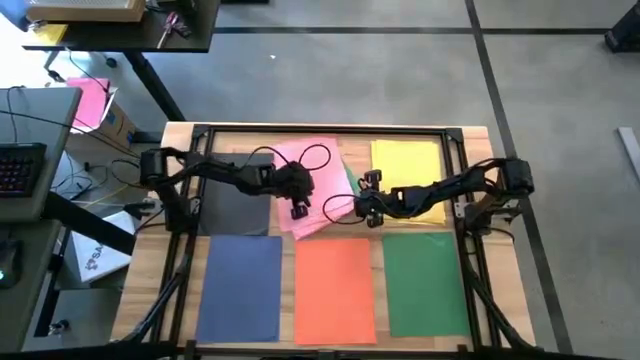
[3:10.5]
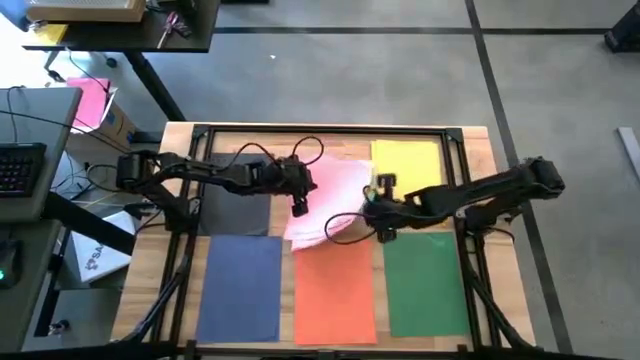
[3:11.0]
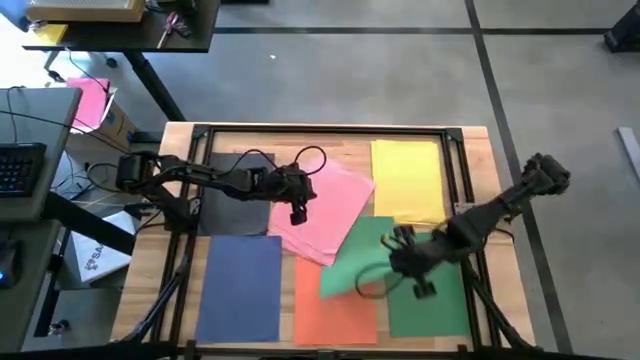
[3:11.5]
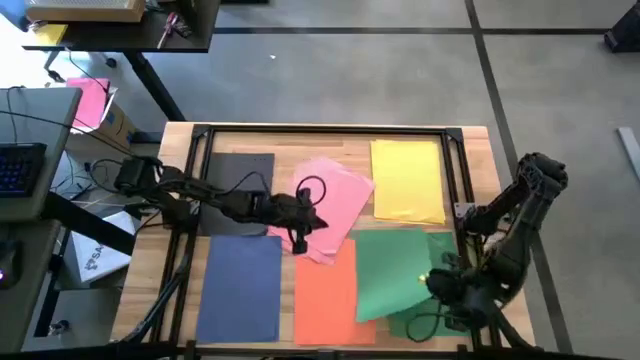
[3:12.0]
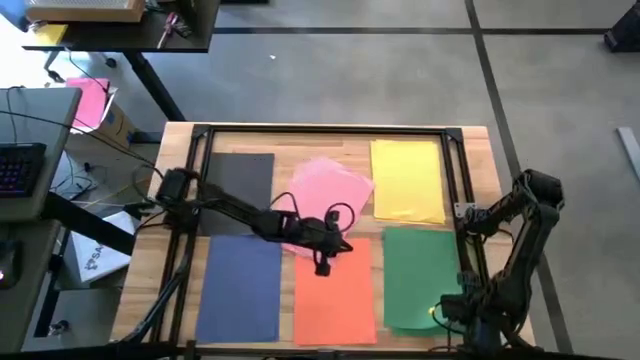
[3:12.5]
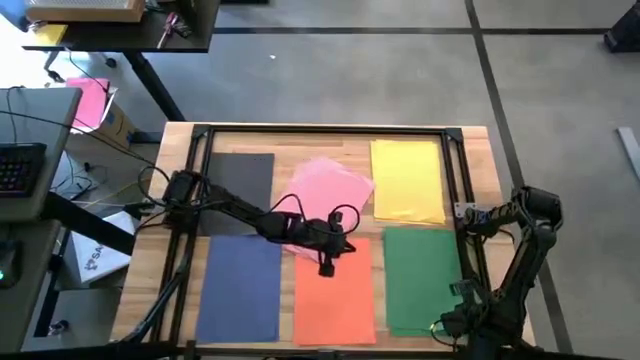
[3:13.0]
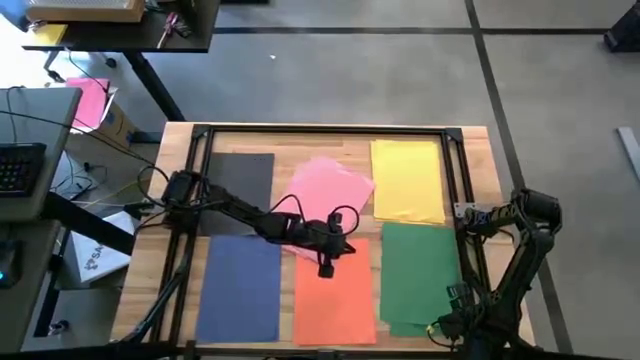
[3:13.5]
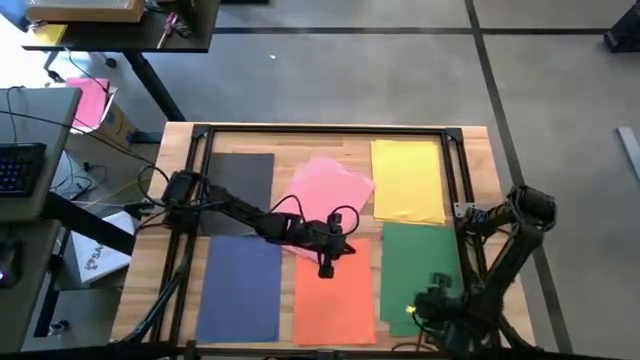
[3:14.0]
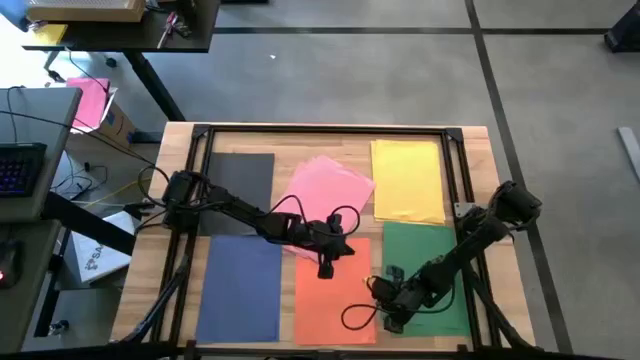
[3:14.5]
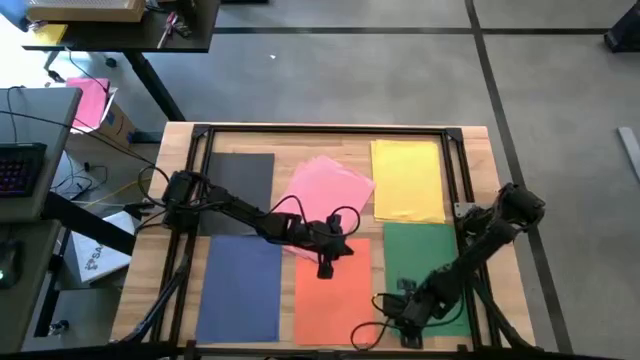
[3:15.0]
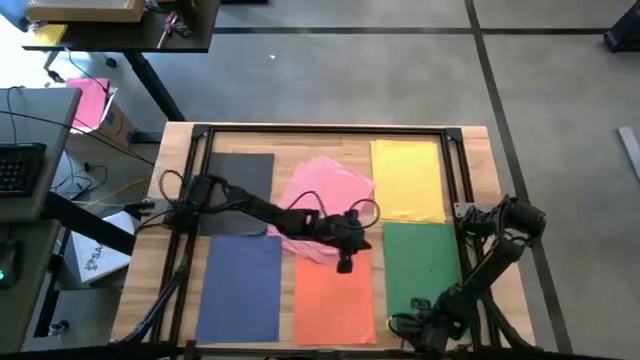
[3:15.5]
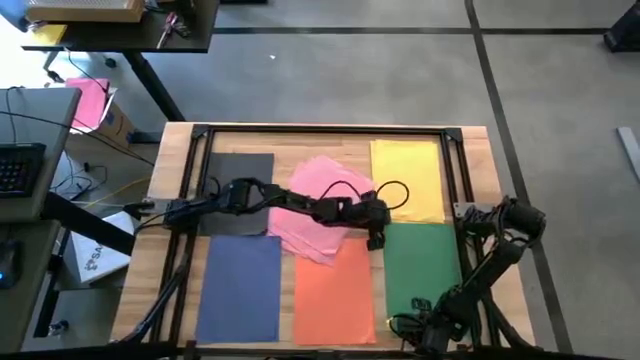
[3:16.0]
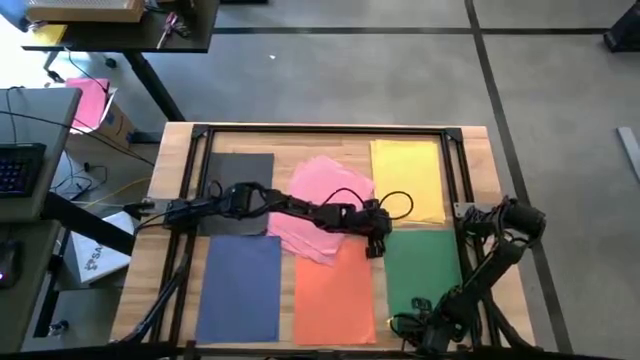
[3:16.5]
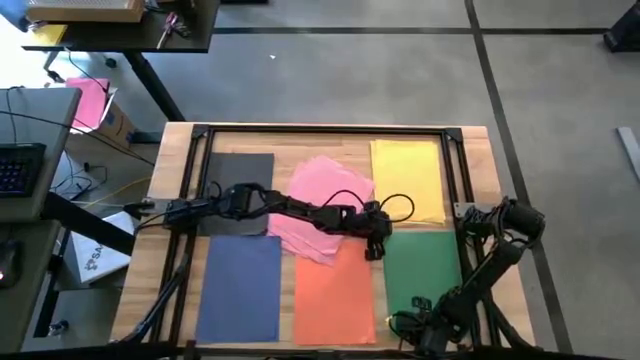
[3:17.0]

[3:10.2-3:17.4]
Task: Organize paper
Stack the green paper on top of the green paper

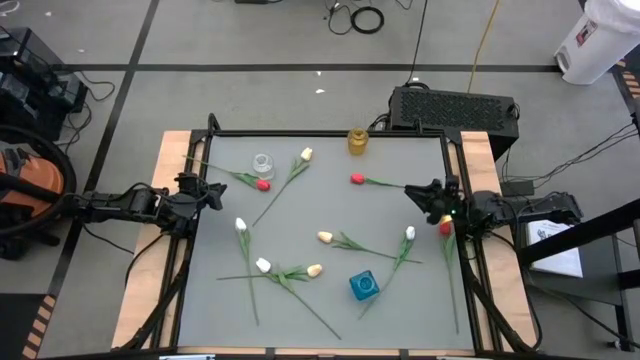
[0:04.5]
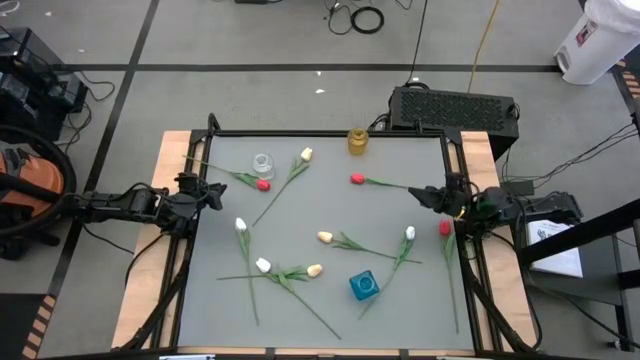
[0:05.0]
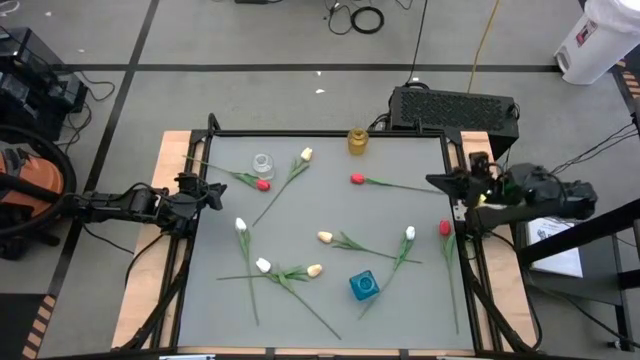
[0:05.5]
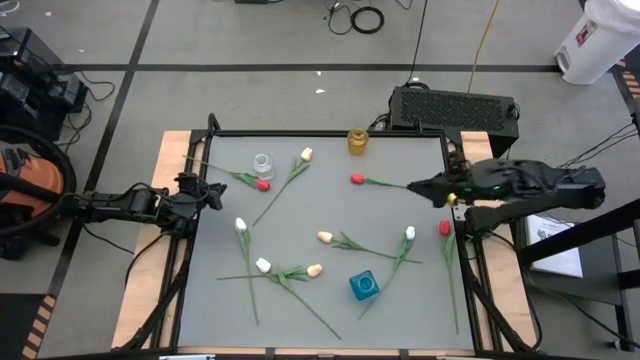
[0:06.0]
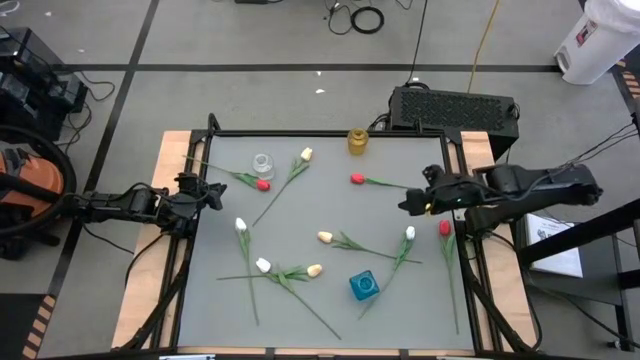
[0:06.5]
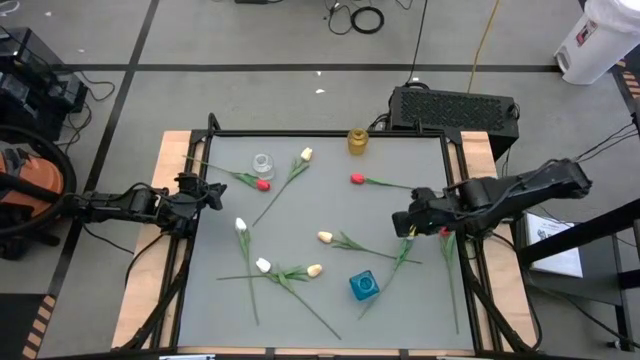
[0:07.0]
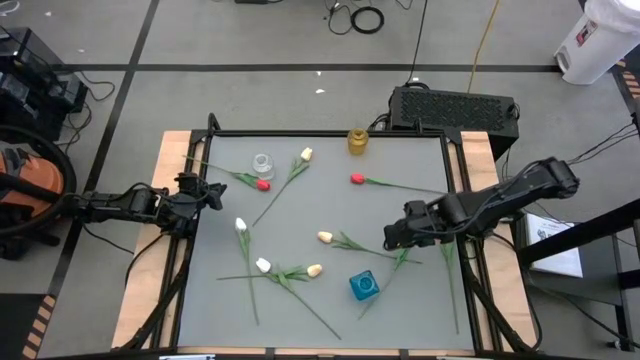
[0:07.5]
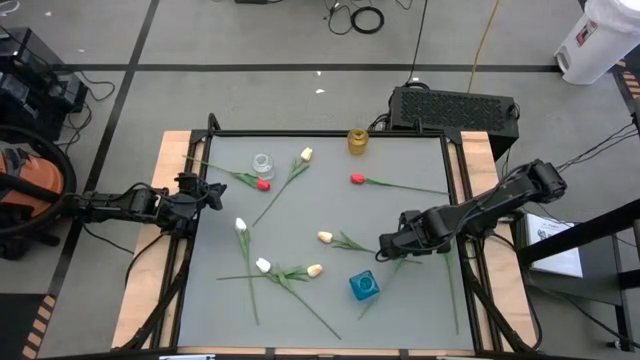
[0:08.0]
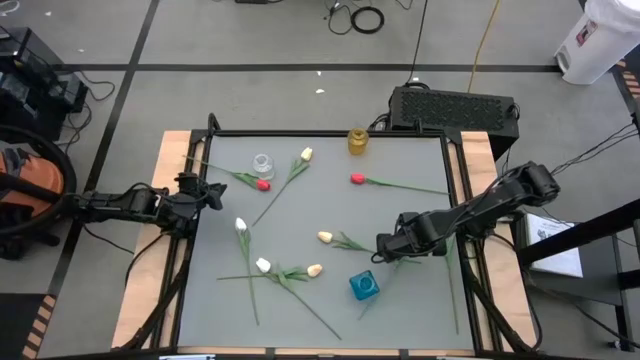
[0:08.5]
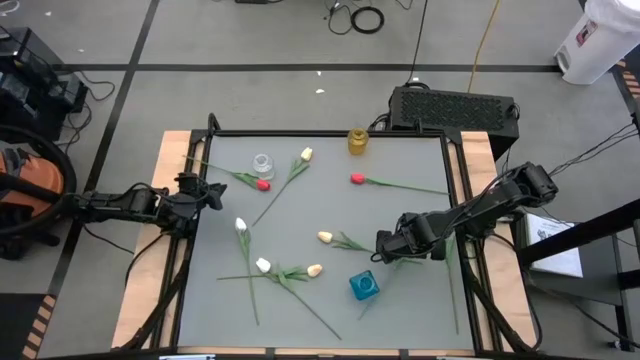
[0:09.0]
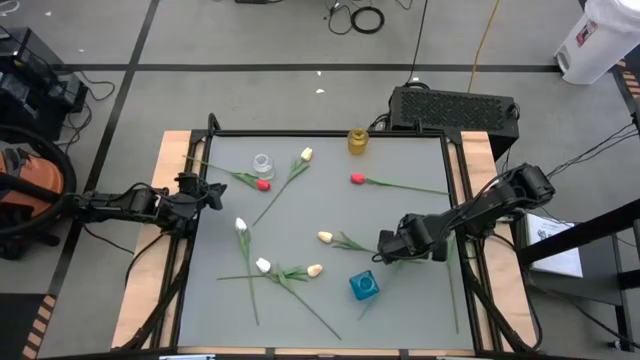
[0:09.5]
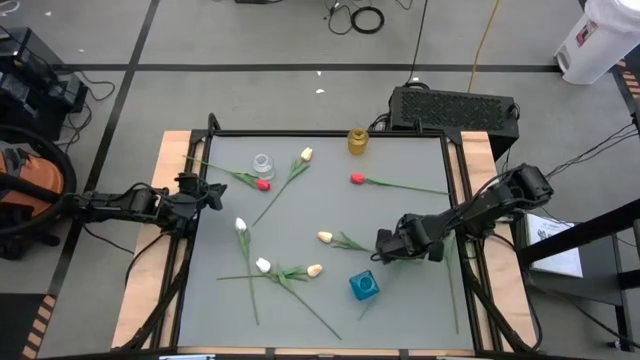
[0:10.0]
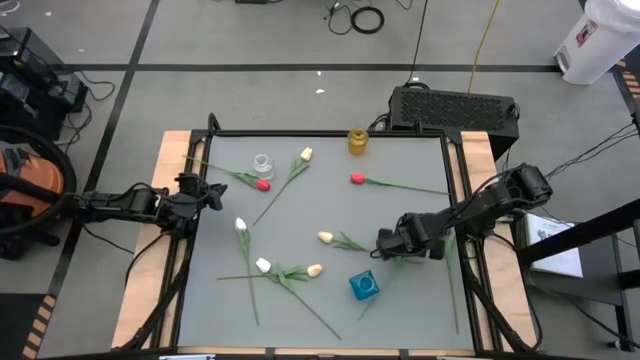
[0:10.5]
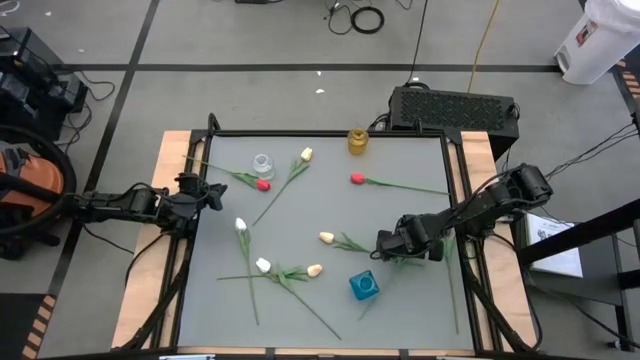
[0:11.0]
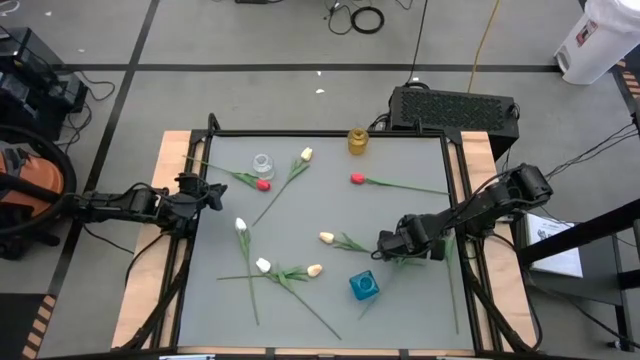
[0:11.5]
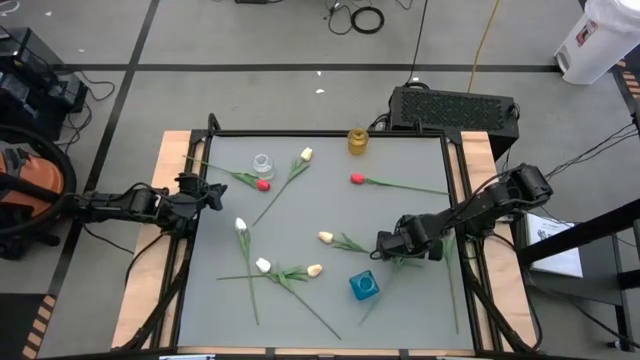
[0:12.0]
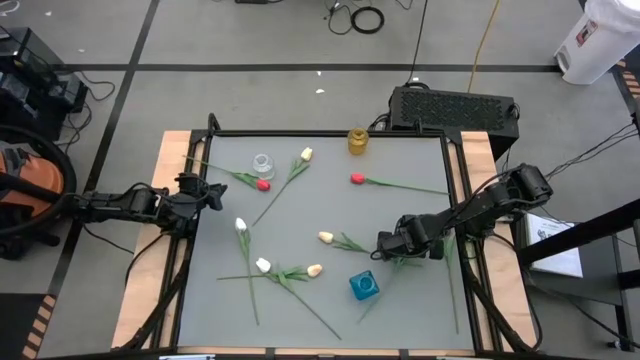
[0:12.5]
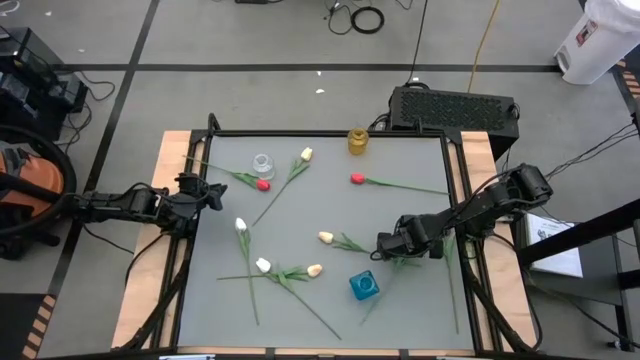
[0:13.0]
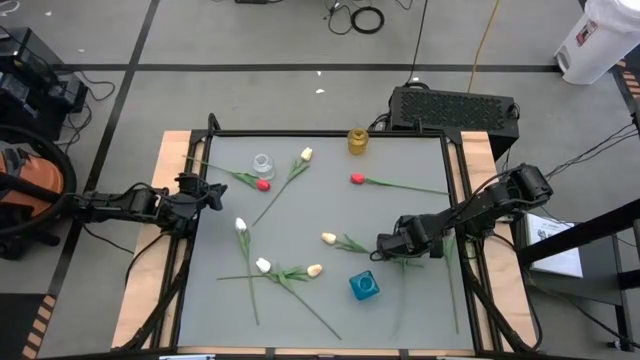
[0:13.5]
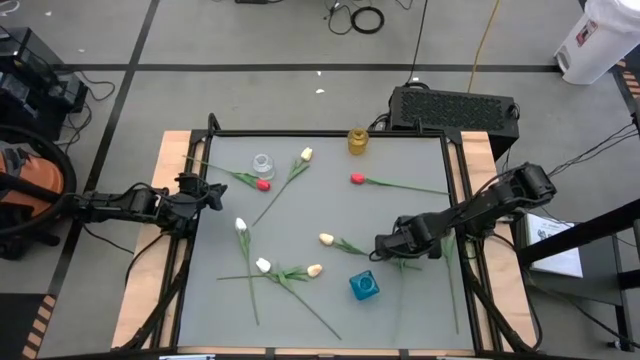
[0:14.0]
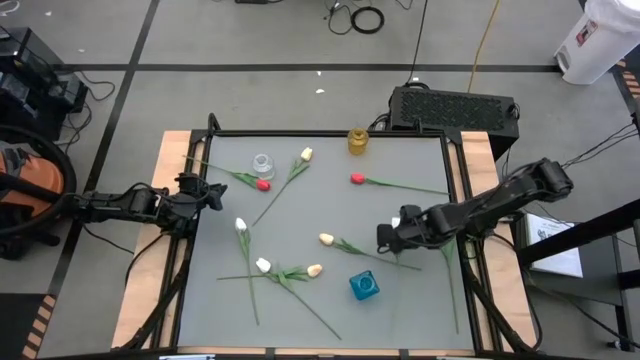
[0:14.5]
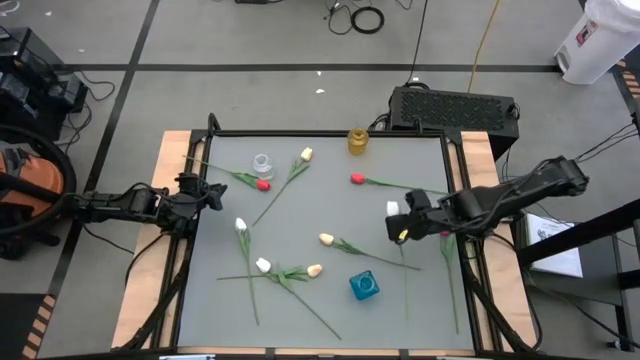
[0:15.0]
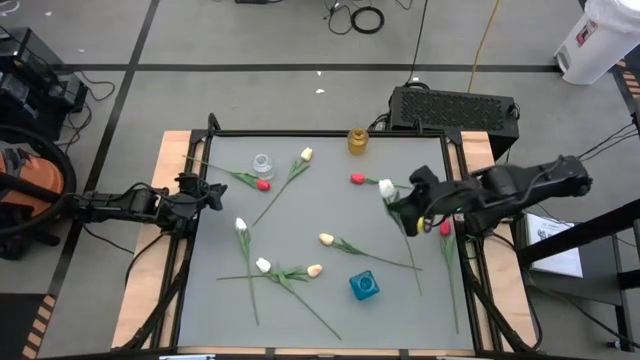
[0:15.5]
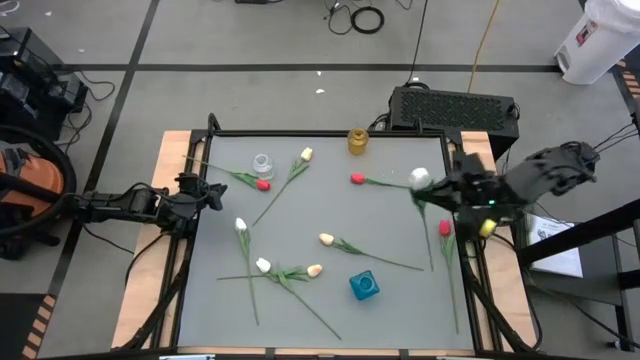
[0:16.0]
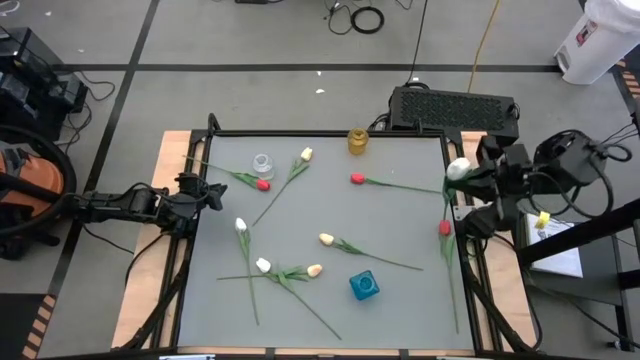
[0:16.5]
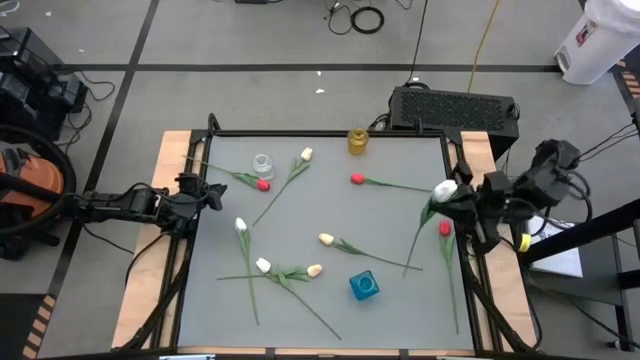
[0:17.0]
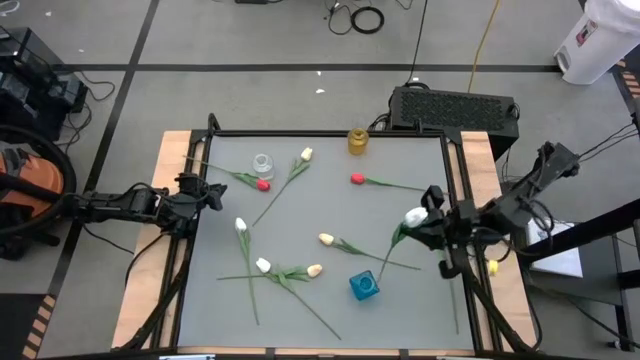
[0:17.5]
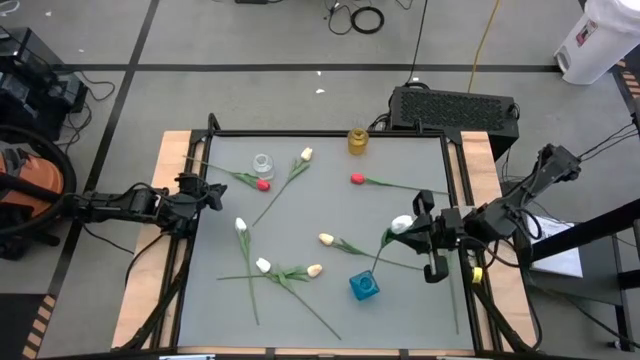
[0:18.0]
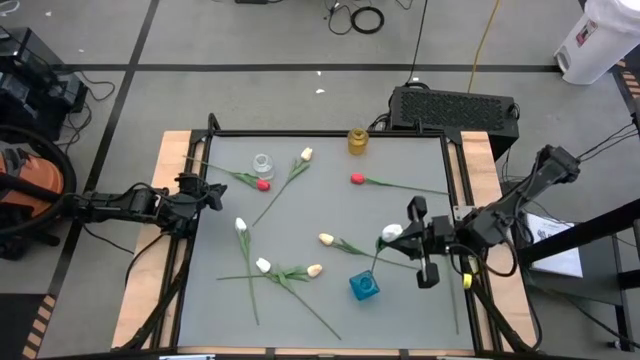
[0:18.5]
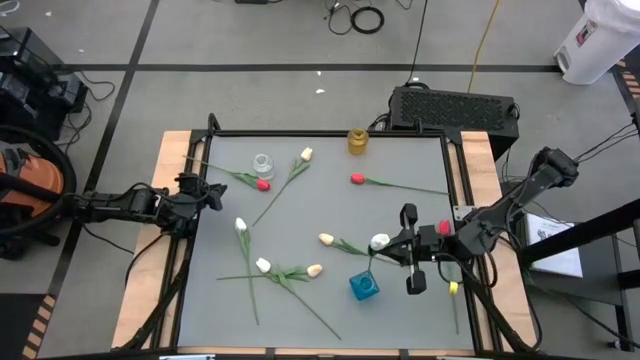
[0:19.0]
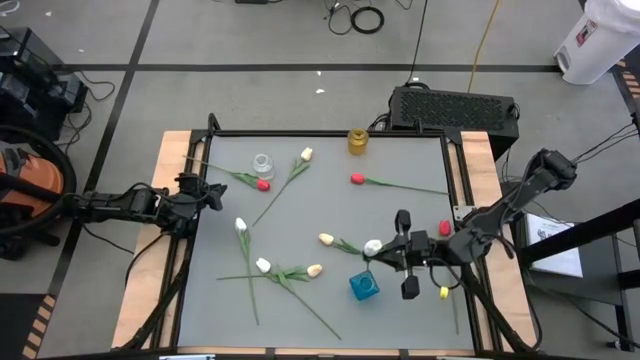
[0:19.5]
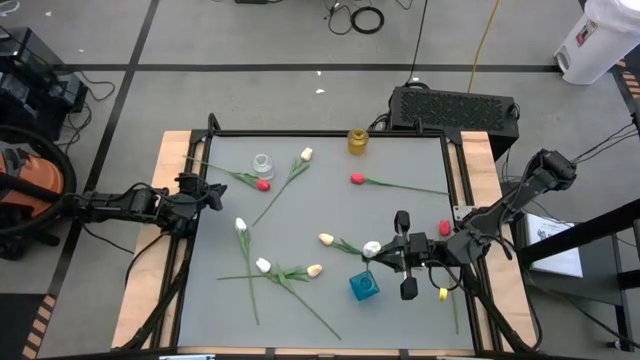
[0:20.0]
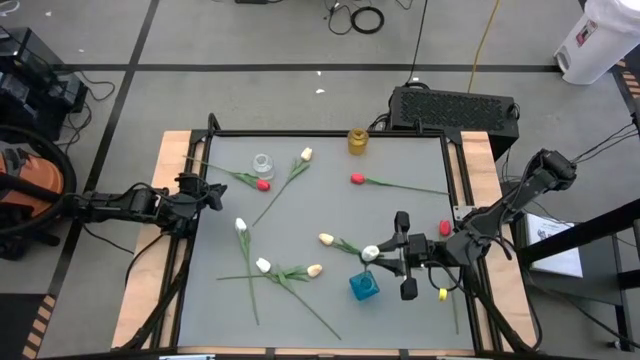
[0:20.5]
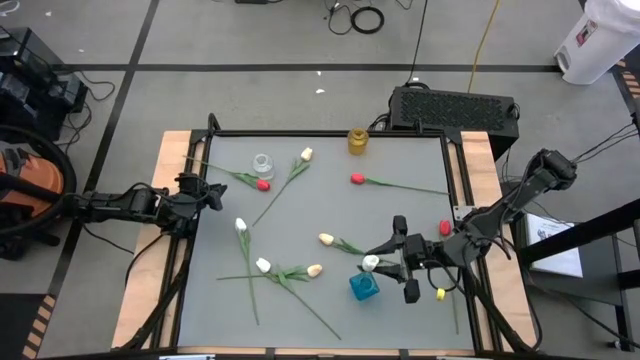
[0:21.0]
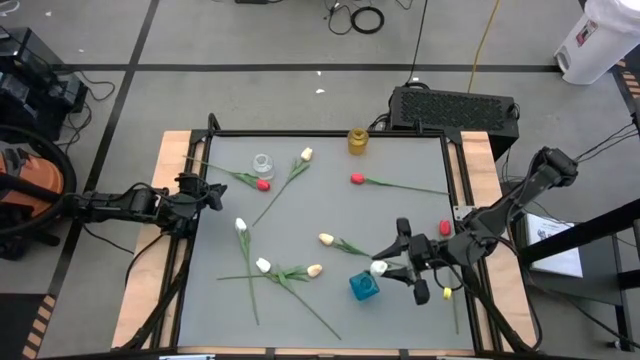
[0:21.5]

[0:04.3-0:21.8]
Task: Sort flowers into vase by color
Put the top right white tulip into the blue vase
